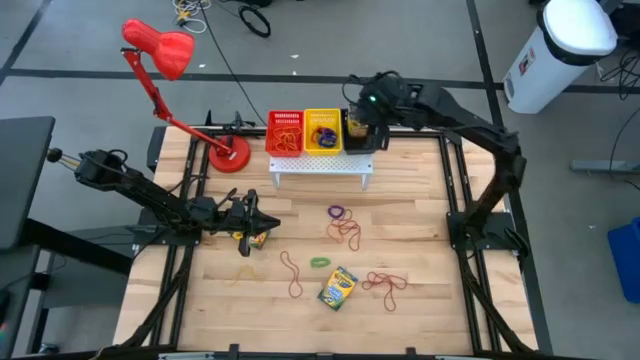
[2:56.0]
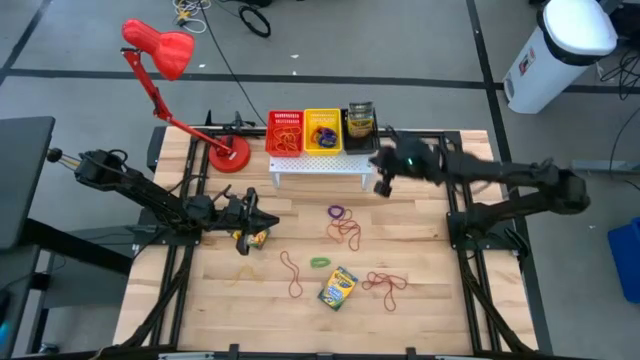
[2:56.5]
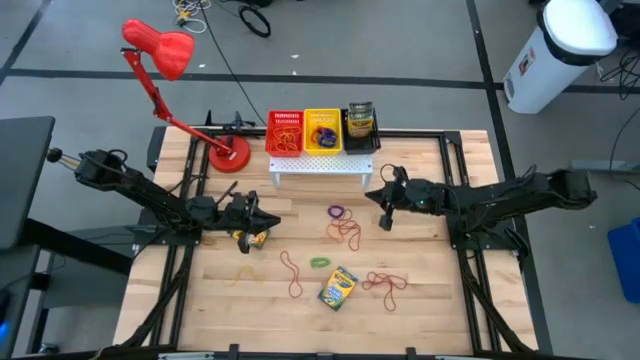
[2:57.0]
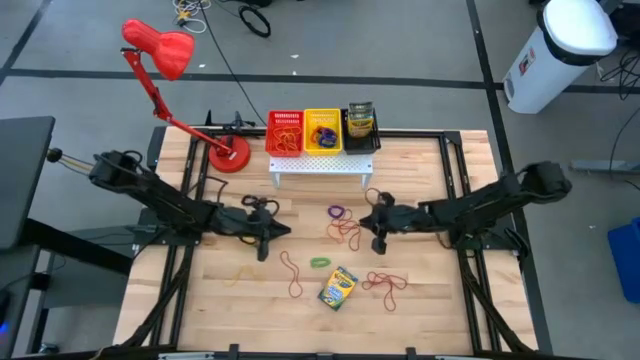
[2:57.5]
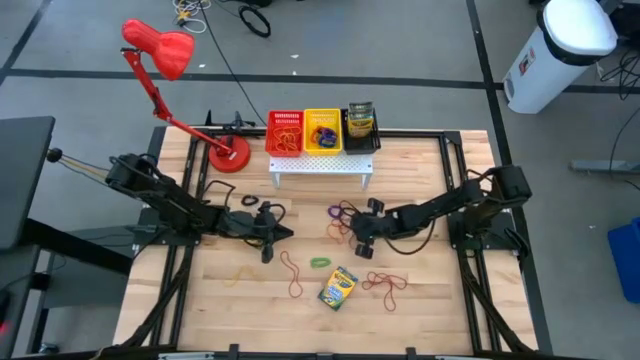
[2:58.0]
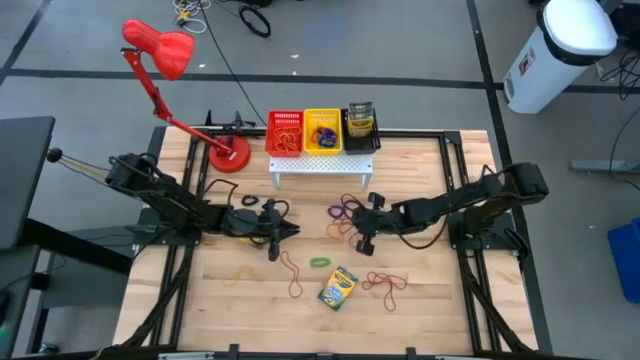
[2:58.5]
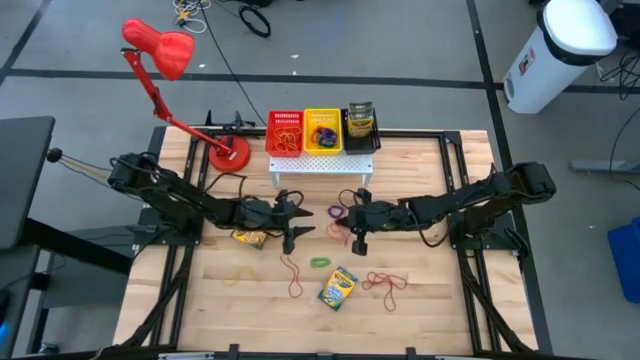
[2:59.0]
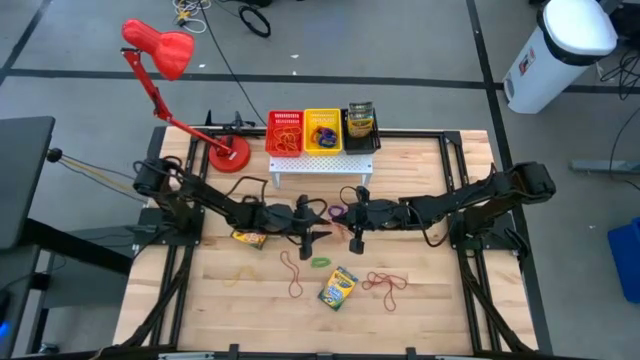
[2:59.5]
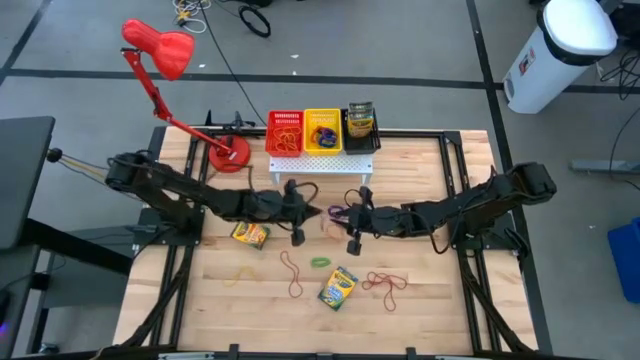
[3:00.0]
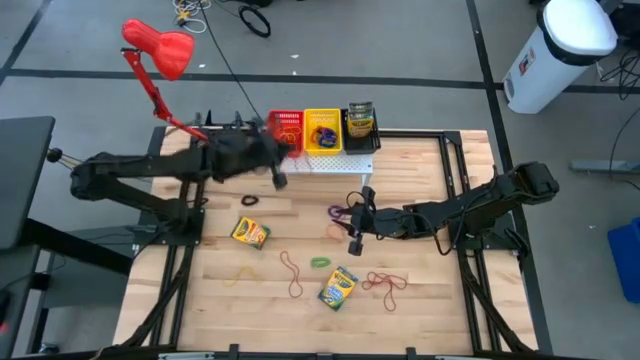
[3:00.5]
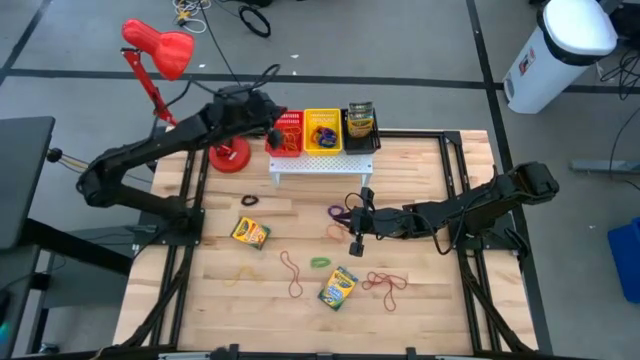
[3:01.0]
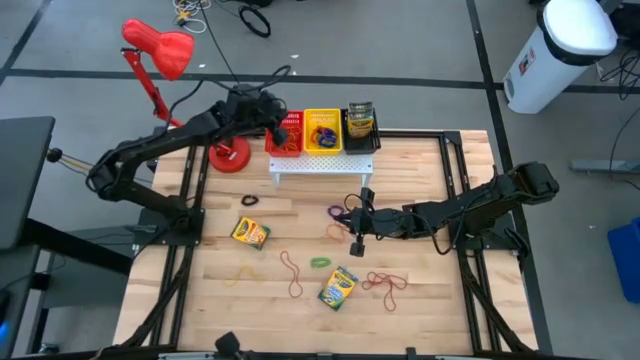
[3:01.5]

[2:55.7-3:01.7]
Task: Pick & Place Office Desk Supplies
Put the red rubber band into the red bin on the shelf

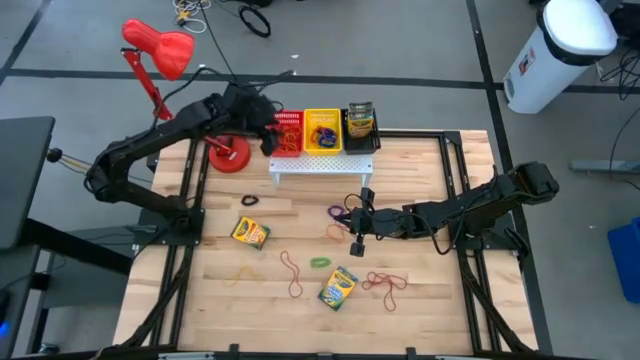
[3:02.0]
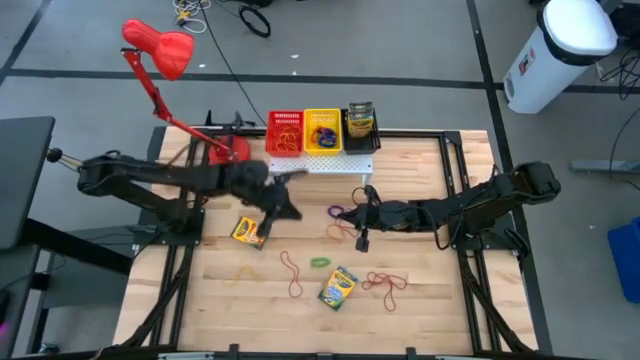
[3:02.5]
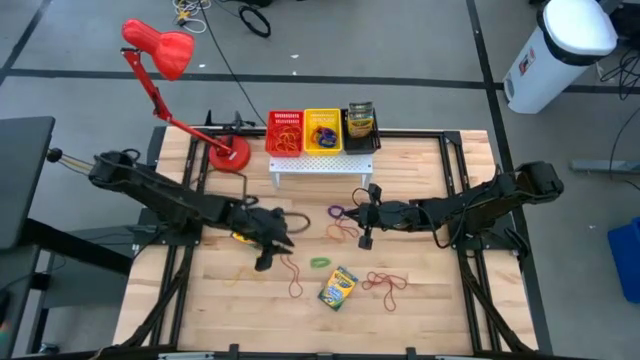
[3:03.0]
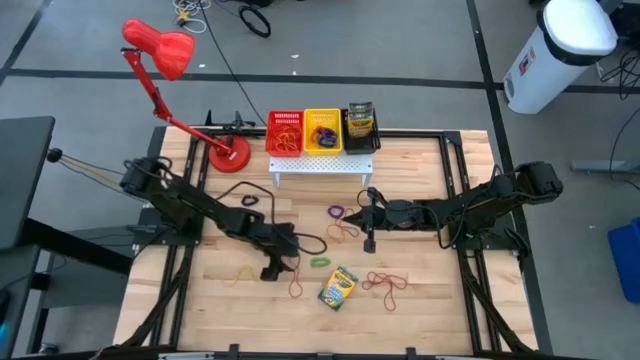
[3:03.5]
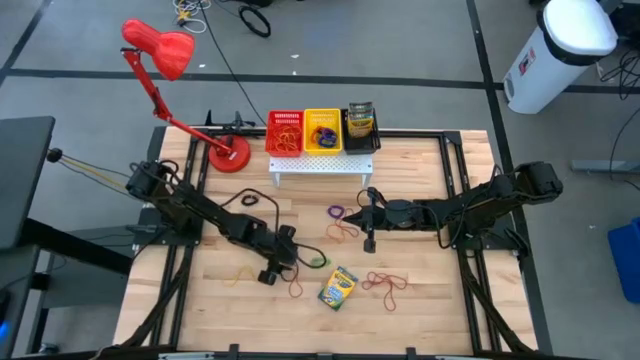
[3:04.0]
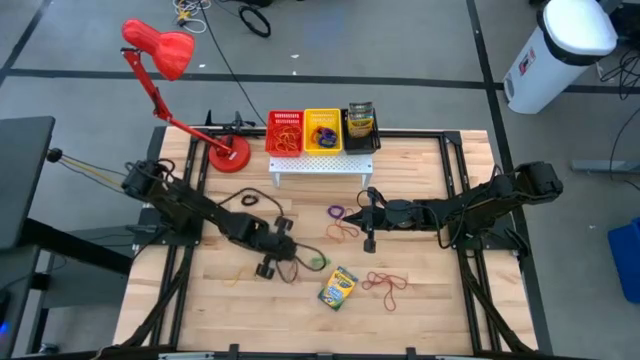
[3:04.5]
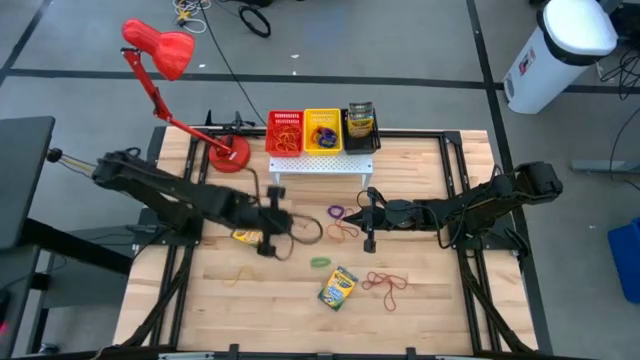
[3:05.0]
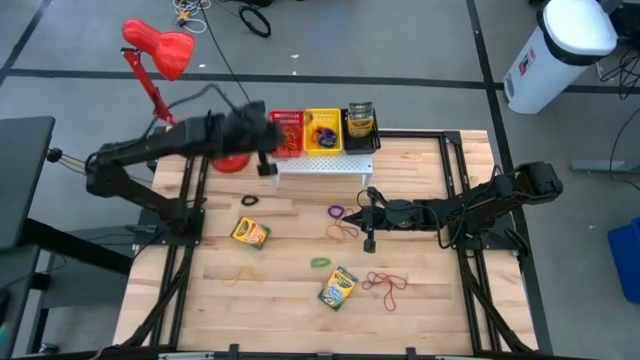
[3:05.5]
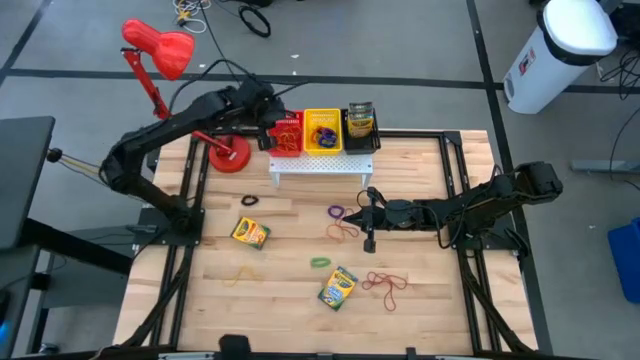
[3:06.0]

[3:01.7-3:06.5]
Put the red rubber band into the red bin on the shelf

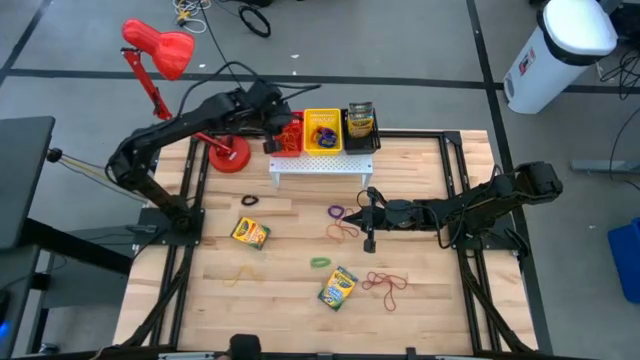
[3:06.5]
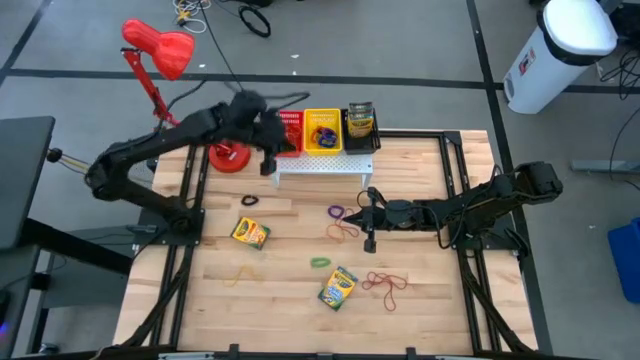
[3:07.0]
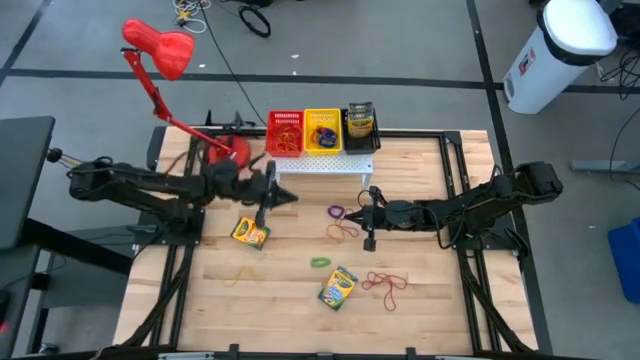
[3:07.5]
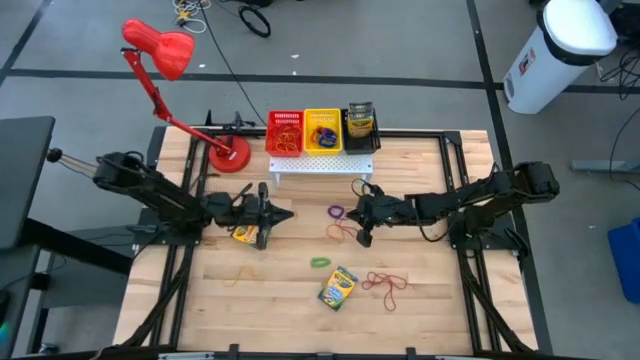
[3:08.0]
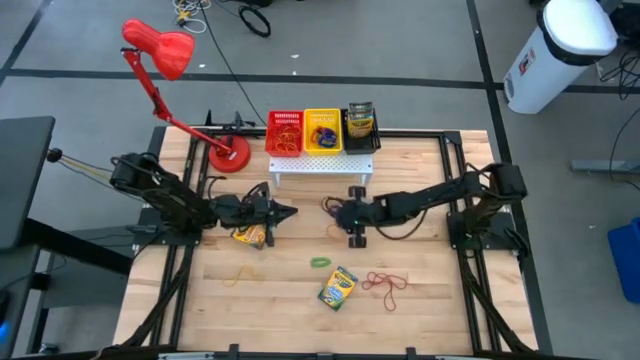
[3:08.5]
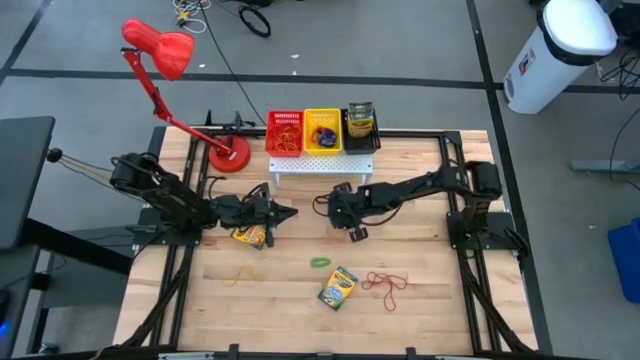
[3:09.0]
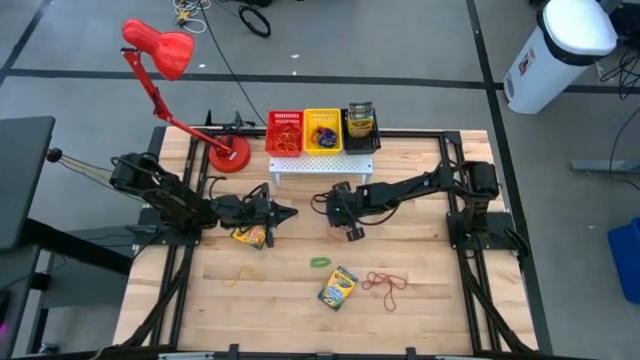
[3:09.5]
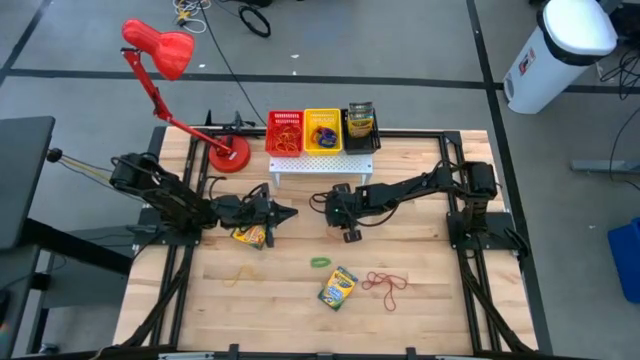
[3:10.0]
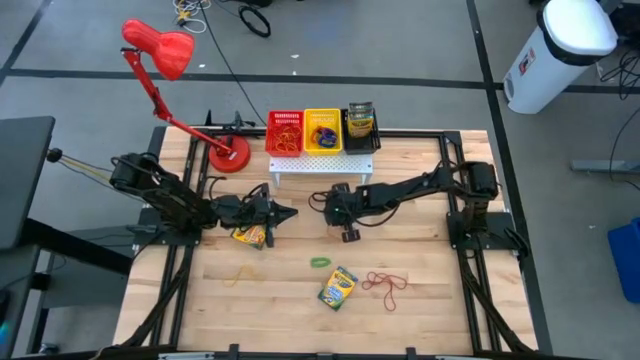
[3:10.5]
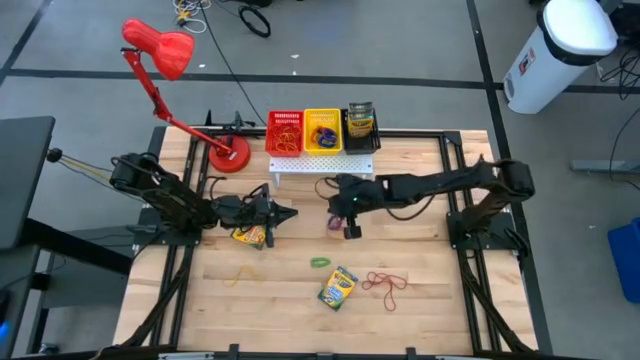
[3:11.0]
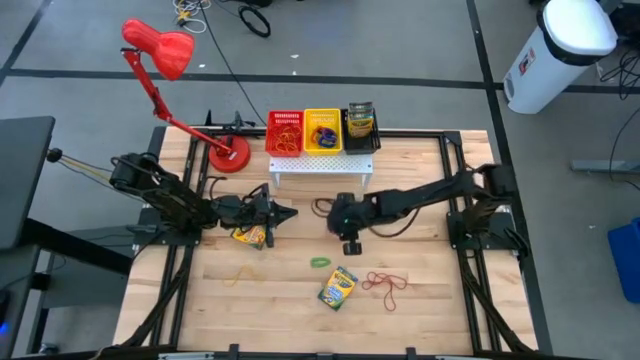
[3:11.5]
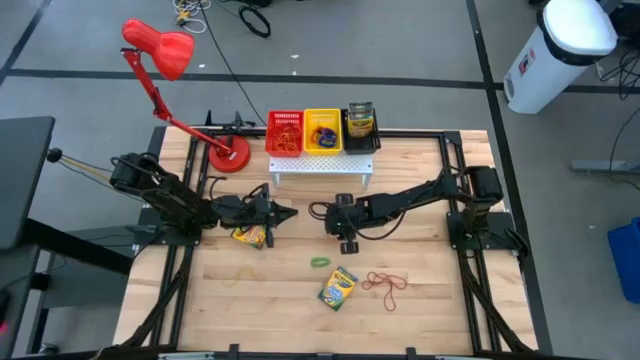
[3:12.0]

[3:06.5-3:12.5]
Put the purple spring keychain into the yellow bin on the shelf

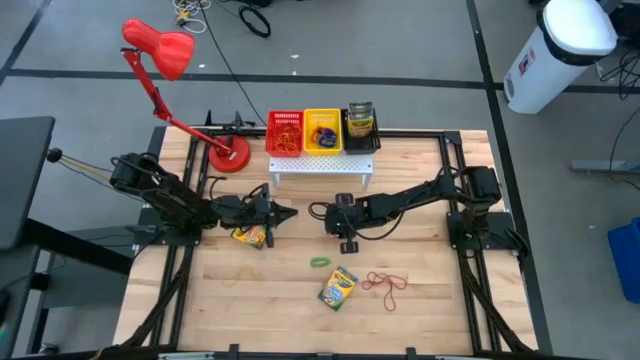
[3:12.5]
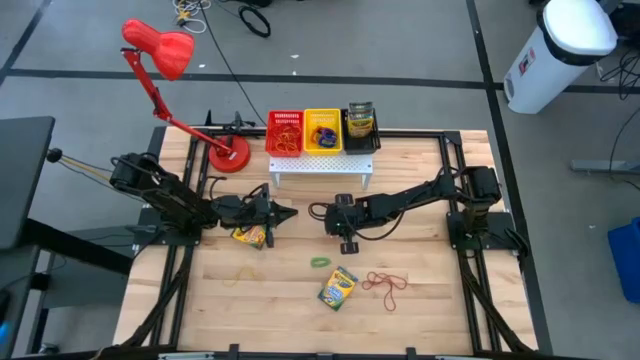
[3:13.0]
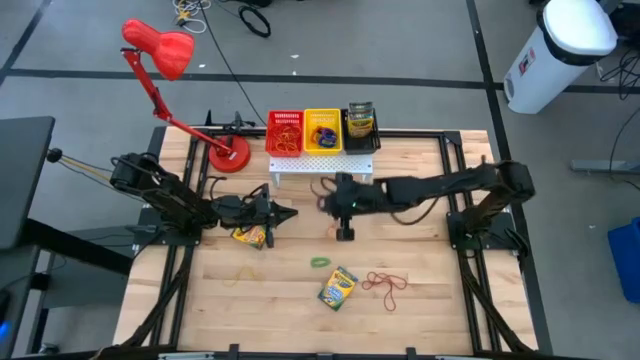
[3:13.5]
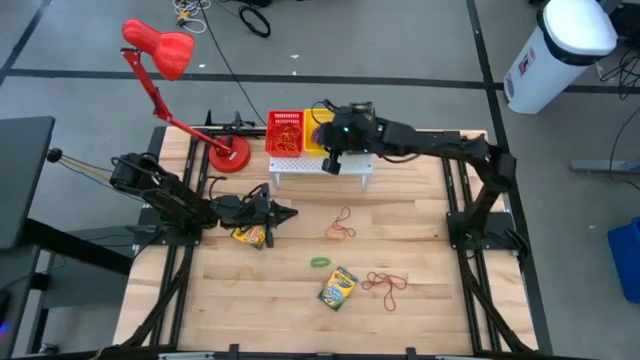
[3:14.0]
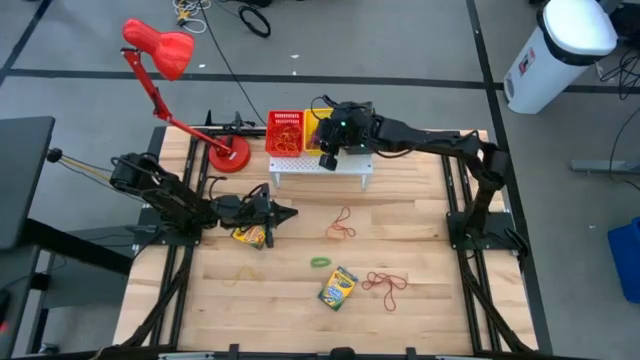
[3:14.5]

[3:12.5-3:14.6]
Put the purple spring keychain into the yellow bin on the shelf

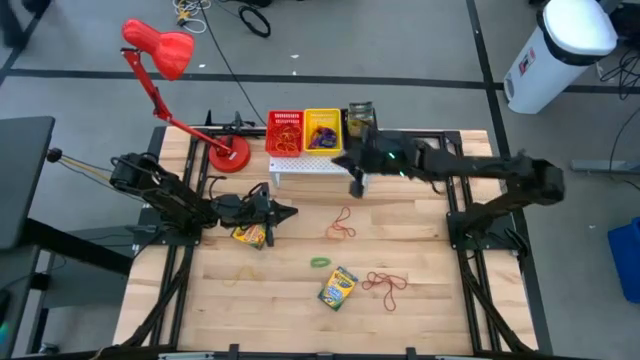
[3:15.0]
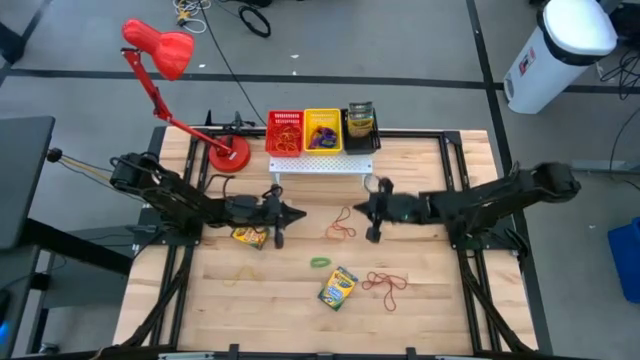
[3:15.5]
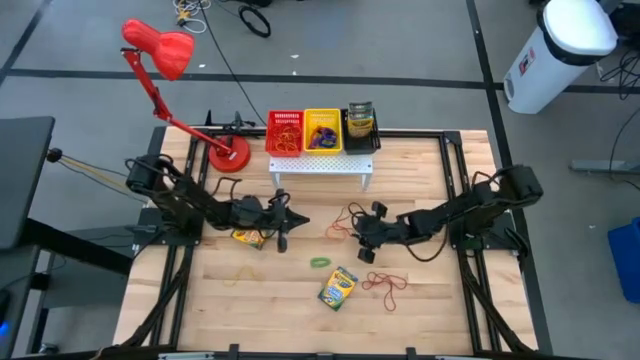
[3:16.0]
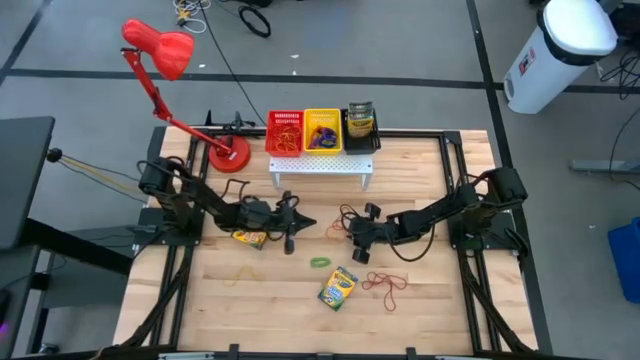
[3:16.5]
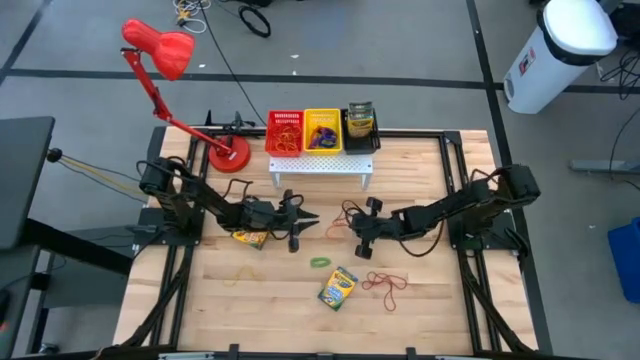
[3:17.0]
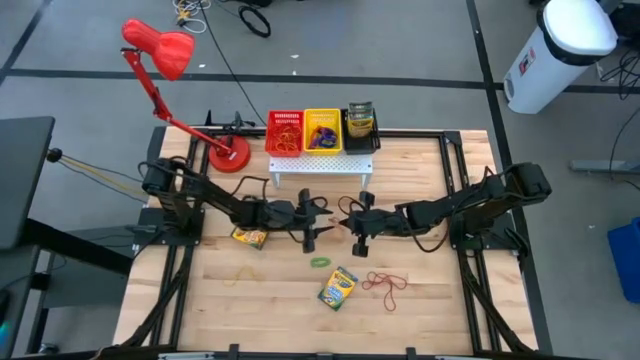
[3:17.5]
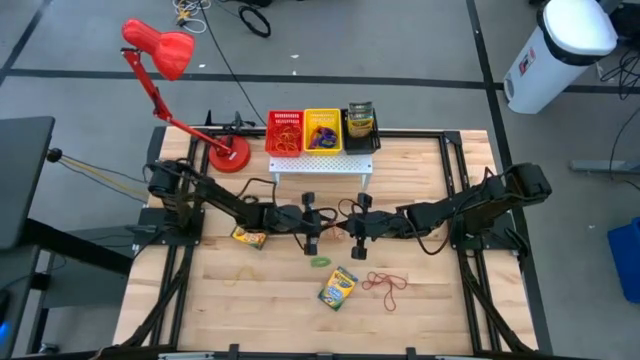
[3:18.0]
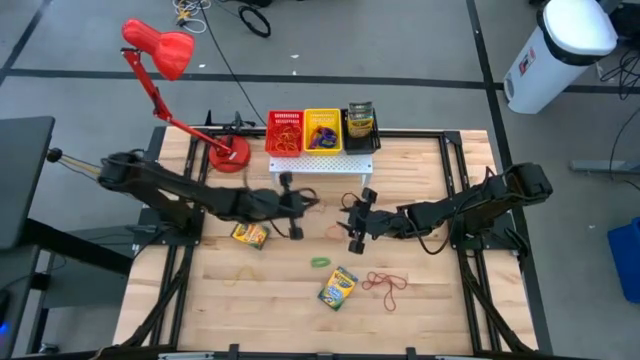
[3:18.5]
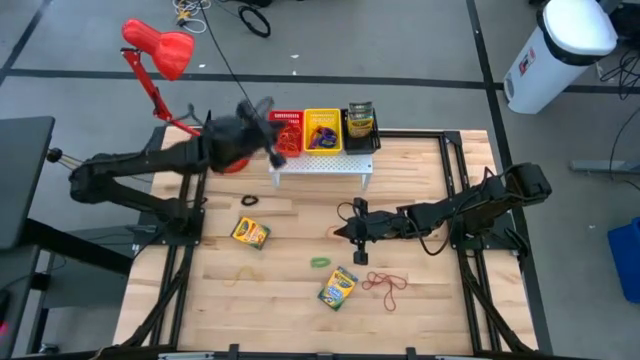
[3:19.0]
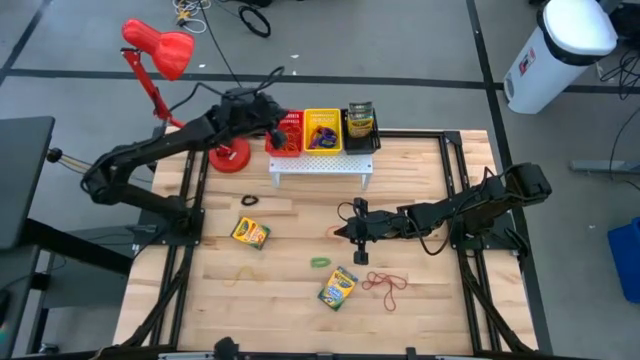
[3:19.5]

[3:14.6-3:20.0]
Put the red rubber band into the red bin on the shelf
